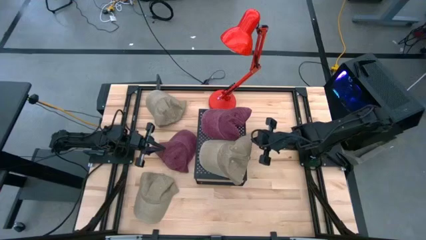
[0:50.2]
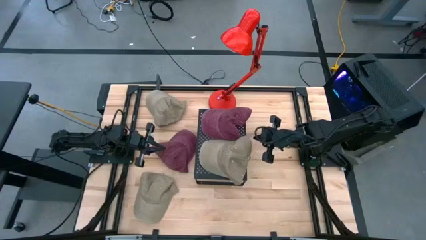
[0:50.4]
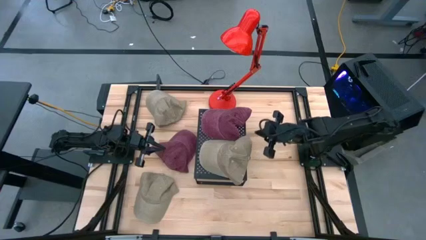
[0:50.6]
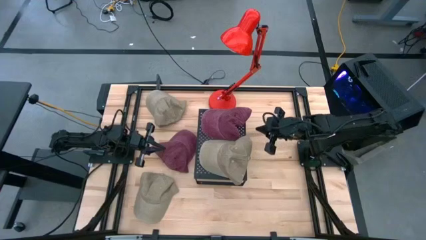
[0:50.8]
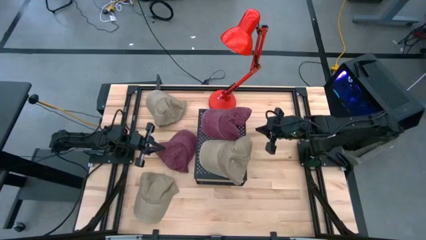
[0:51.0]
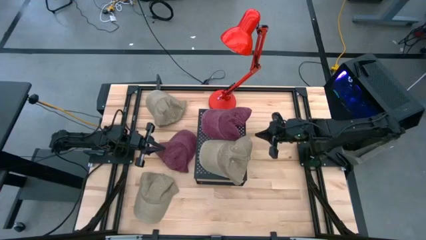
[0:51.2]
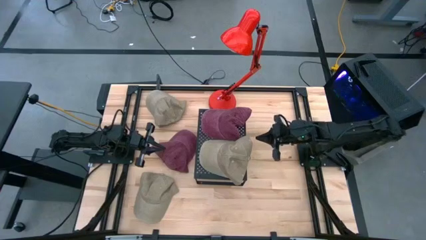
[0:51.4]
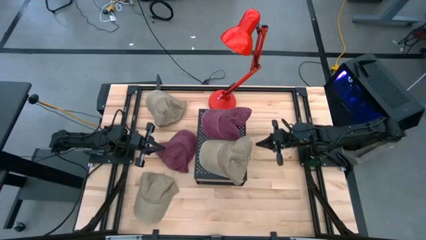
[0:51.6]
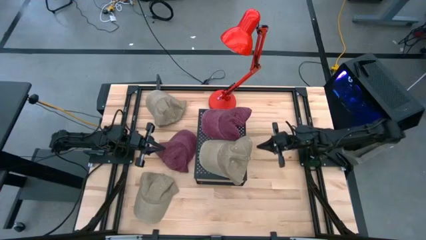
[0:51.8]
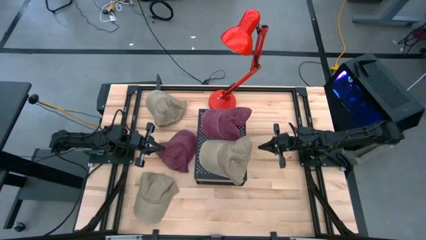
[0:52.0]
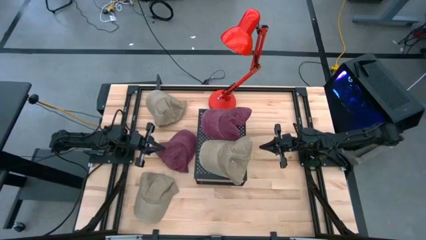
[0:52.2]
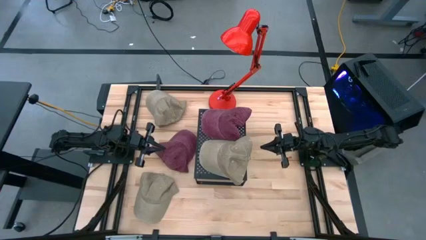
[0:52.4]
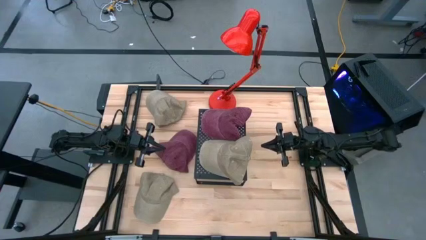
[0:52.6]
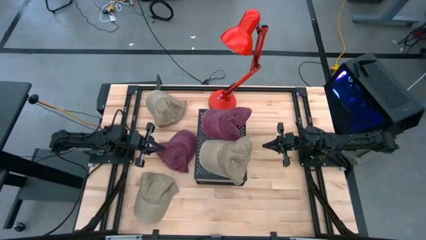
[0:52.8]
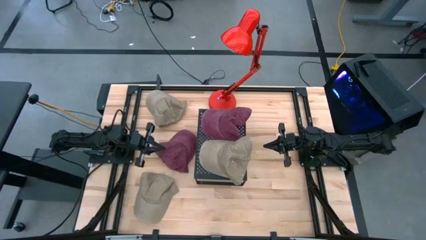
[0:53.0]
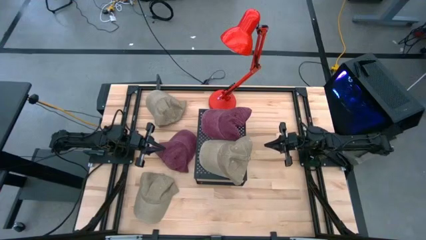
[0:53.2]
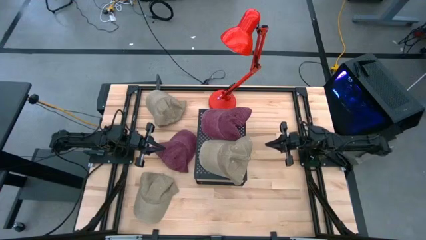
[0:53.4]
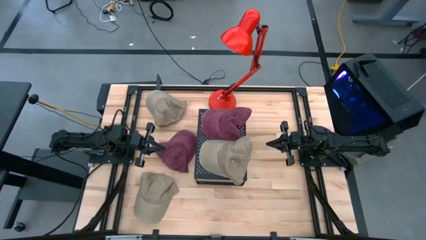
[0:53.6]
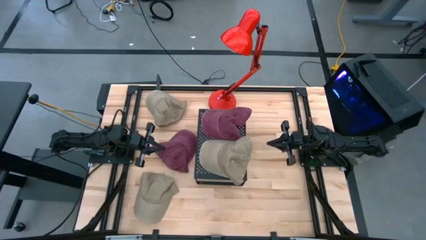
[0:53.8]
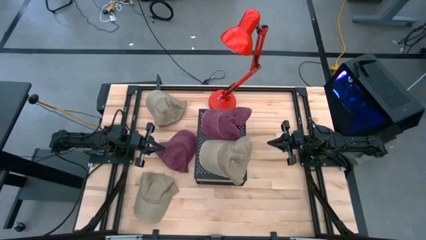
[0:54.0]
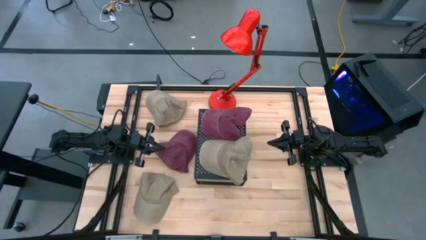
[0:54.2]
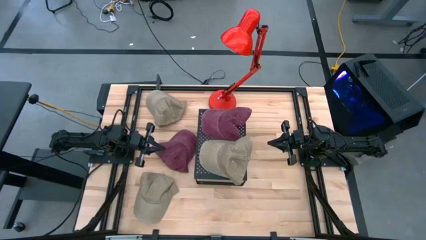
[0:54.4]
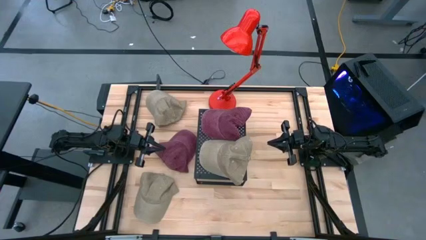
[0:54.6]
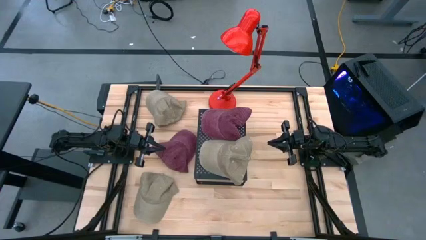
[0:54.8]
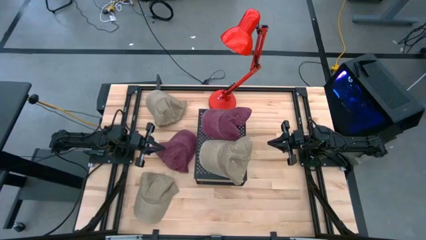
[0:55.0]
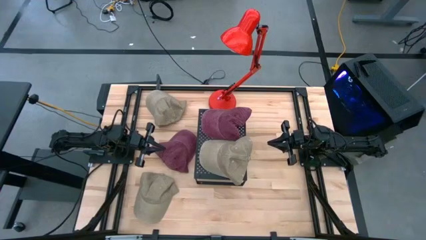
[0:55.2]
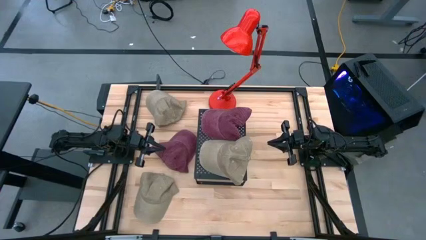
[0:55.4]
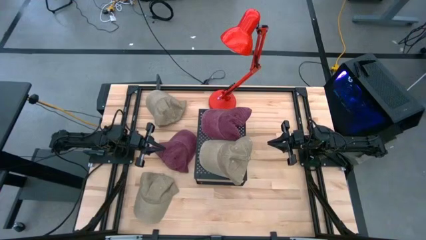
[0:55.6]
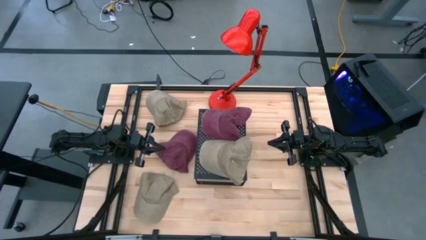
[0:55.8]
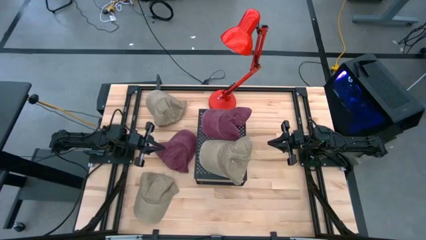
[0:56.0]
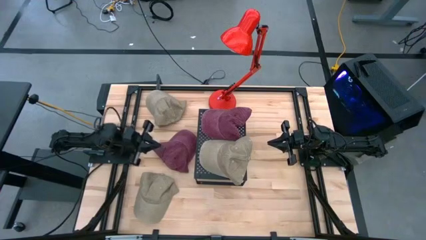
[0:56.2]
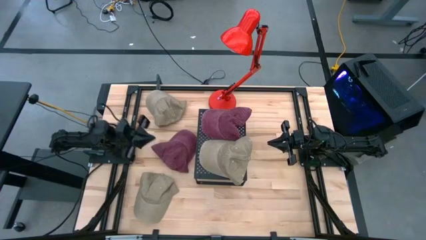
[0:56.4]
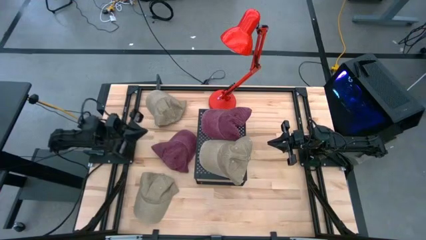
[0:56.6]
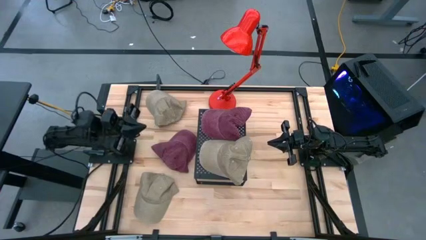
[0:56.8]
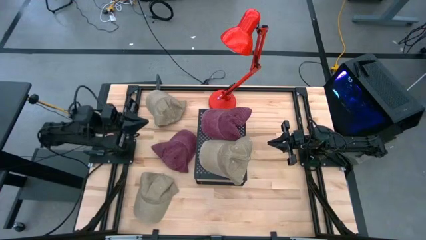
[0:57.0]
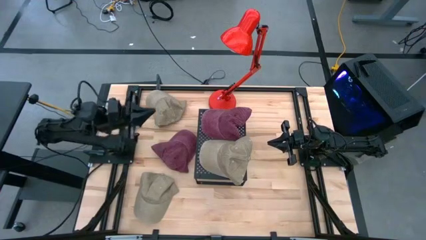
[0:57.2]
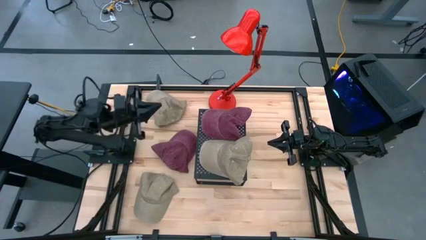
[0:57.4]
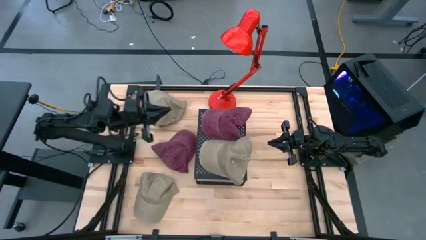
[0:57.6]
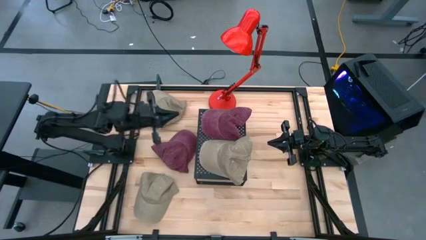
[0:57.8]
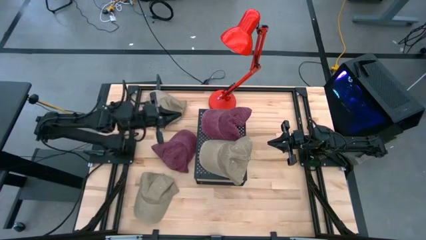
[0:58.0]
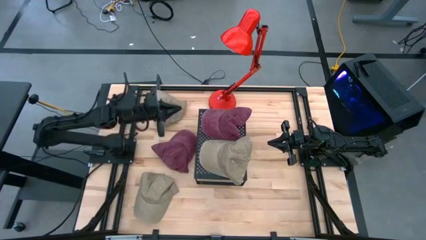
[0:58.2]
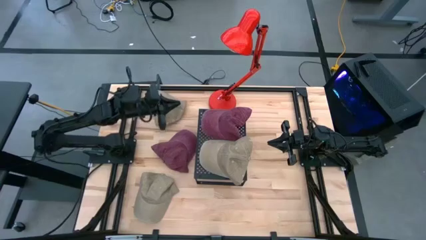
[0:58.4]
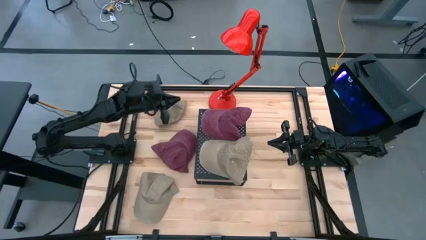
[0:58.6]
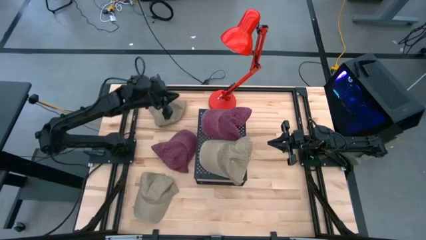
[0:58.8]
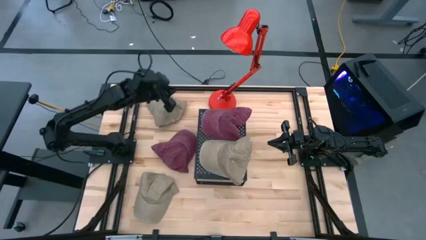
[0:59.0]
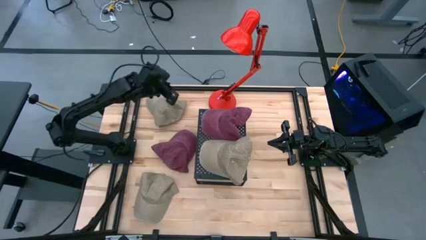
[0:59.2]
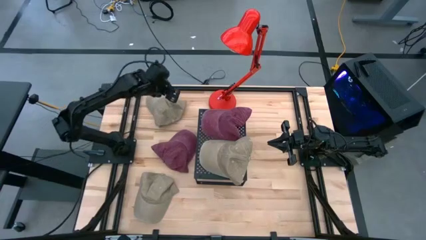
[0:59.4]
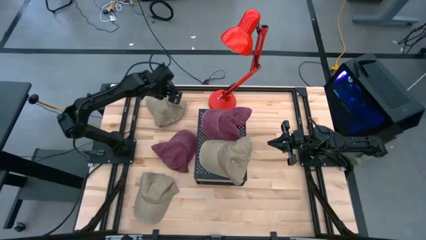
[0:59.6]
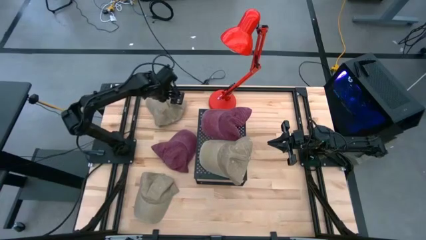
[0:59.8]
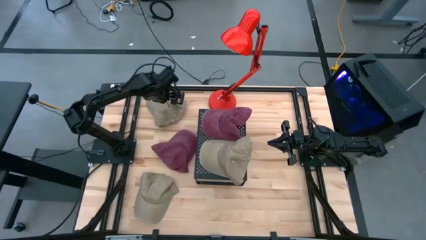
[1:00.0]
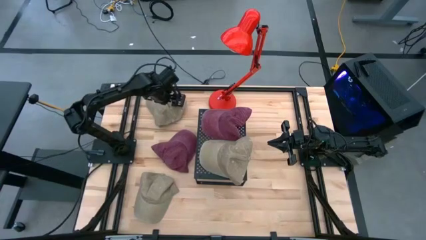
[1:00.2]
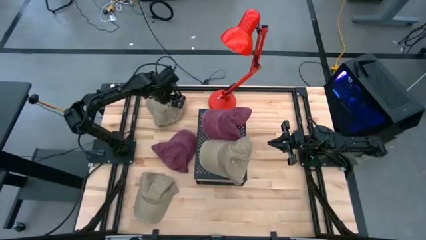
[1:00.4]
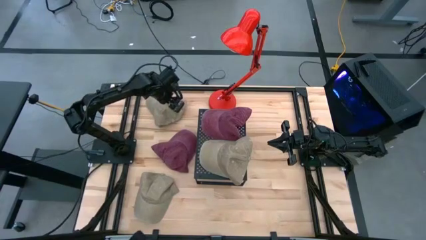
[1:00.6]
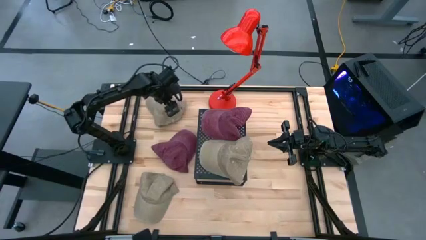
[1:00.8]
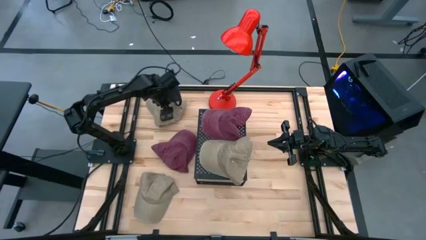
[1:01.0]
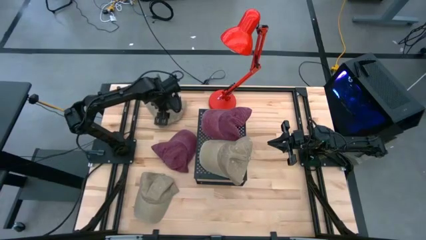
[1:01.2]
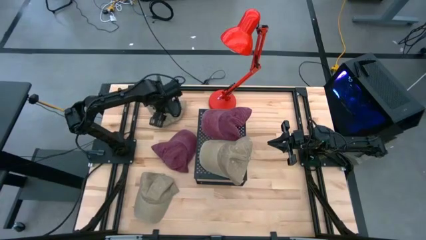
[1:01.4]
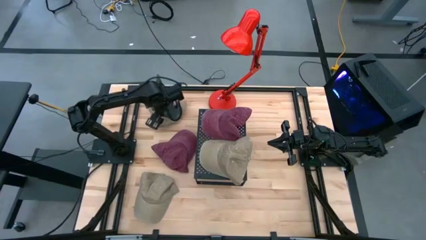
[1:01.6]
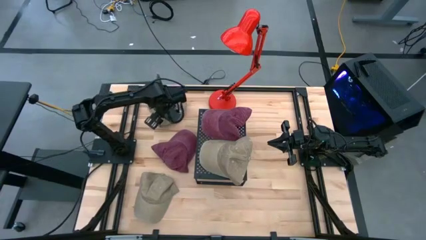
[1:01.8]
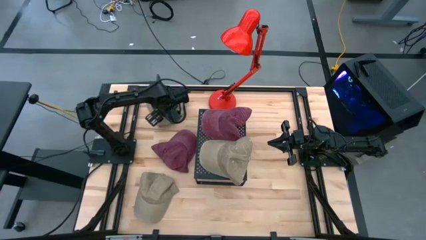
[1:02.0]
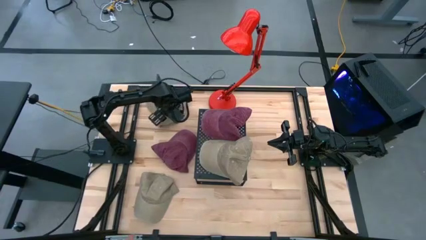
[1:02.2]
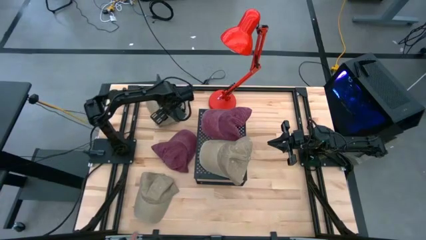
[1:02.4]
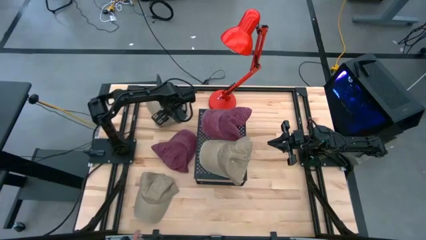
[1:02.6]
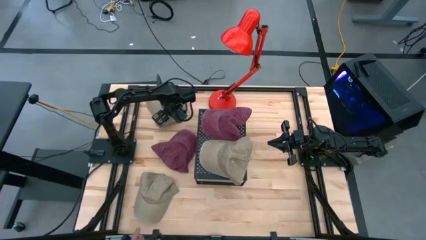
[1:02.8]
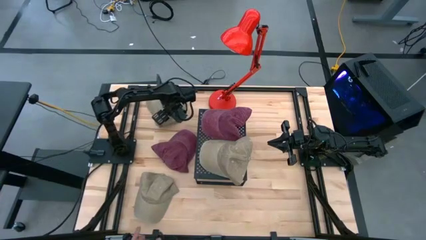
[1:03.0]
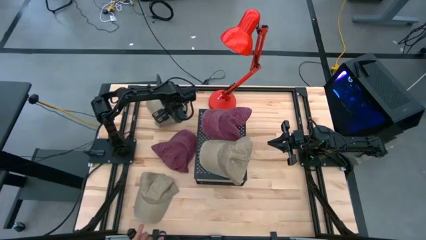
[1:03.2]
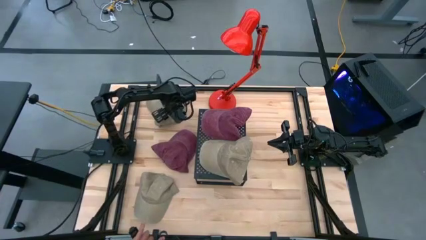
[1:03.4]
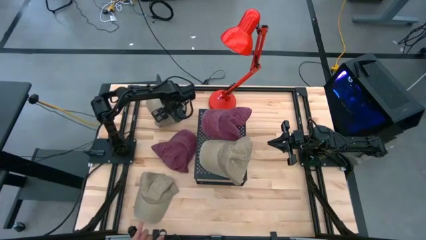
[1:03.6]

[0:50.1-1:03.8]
Task: Pick & Place hat
Stack the top brown cap on top of the brown cap on the shelf
